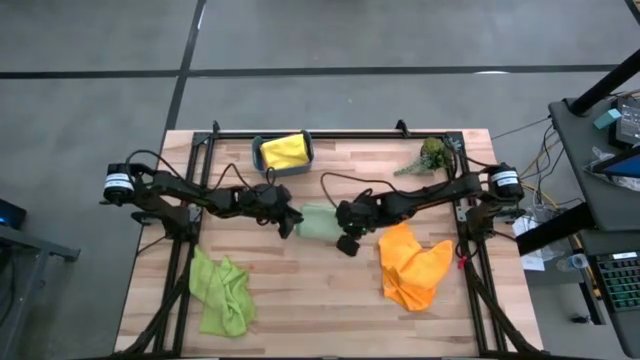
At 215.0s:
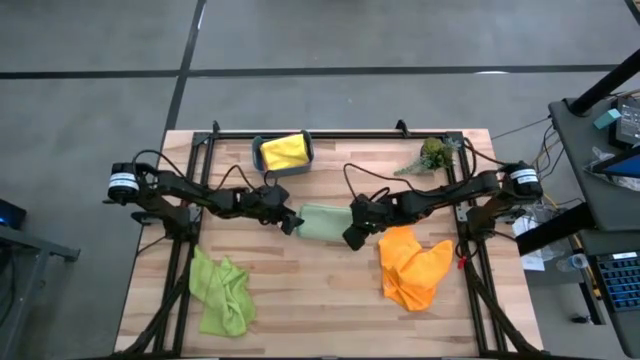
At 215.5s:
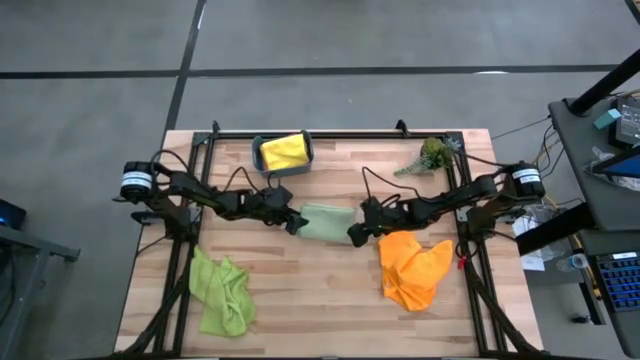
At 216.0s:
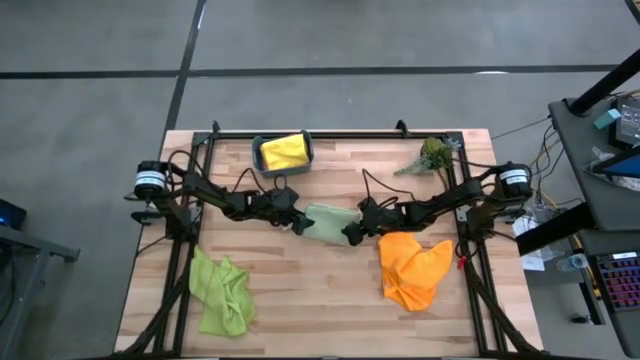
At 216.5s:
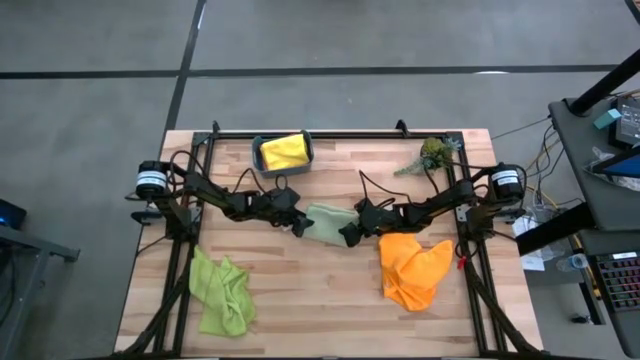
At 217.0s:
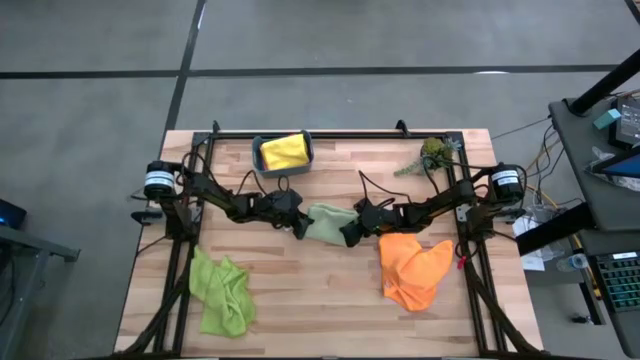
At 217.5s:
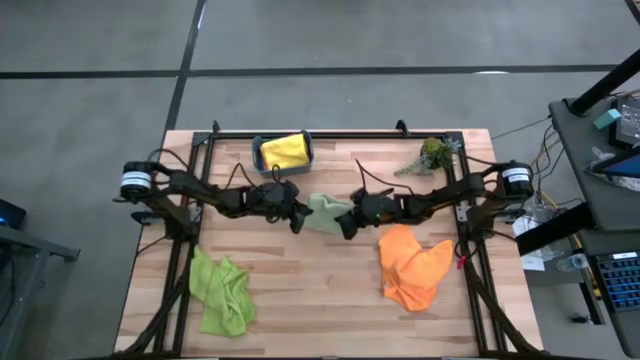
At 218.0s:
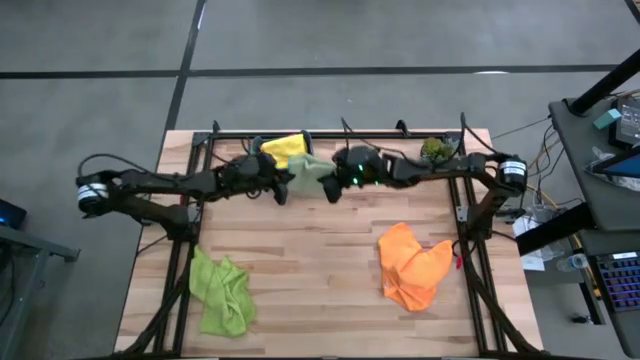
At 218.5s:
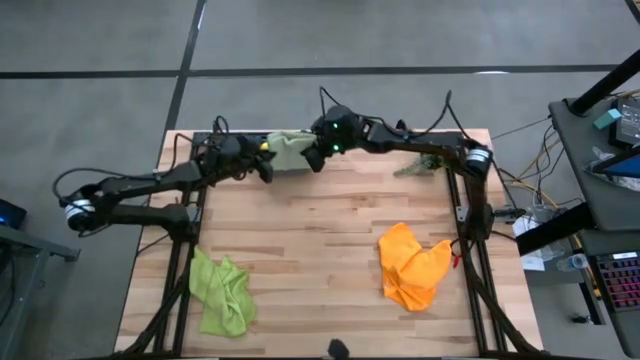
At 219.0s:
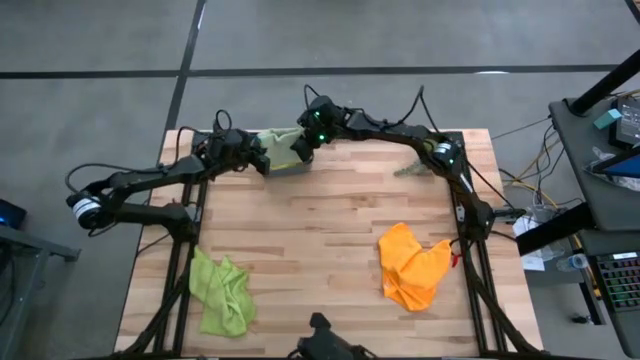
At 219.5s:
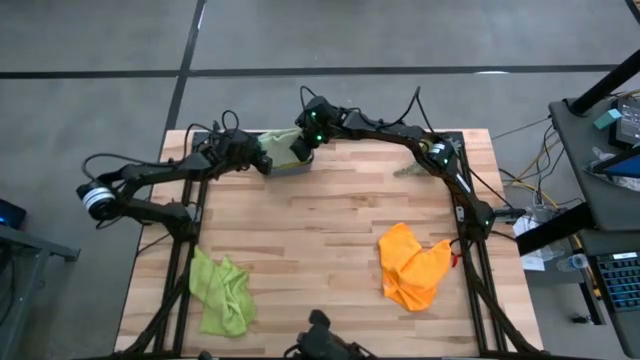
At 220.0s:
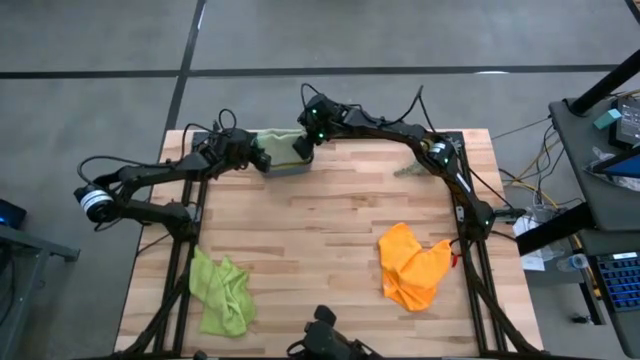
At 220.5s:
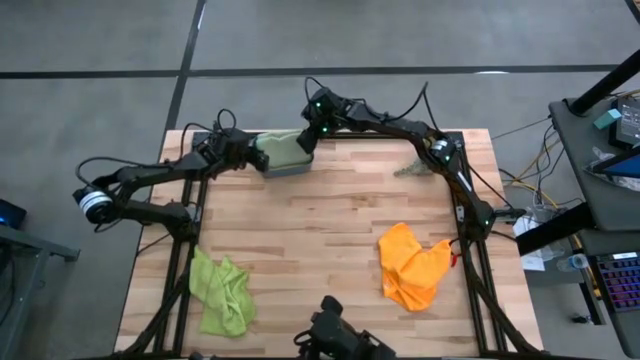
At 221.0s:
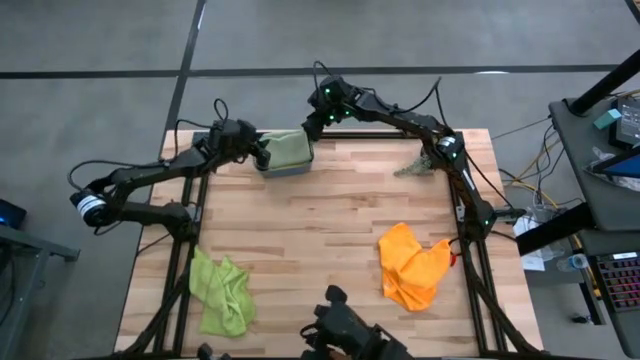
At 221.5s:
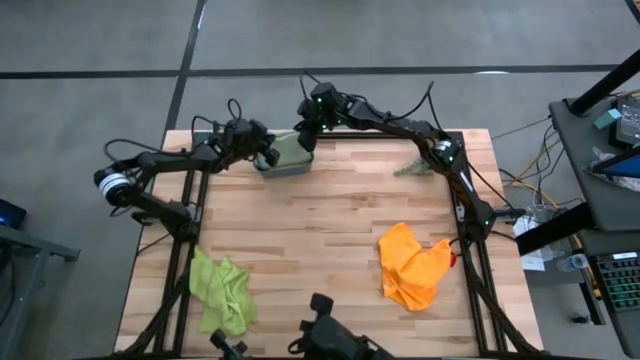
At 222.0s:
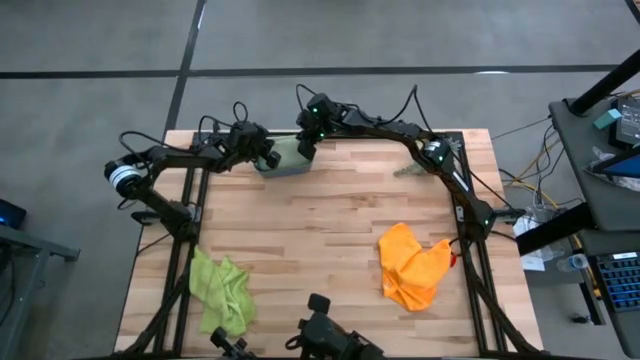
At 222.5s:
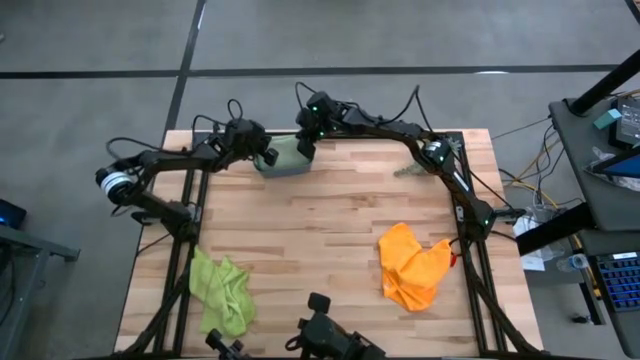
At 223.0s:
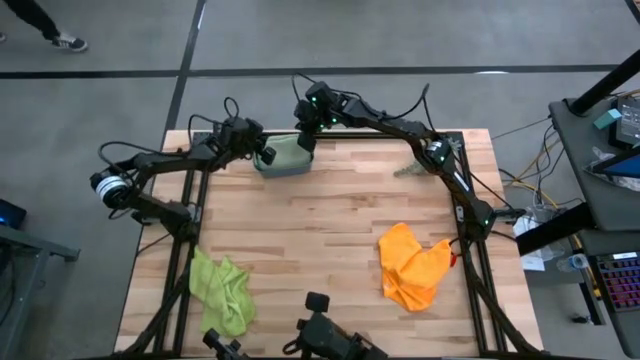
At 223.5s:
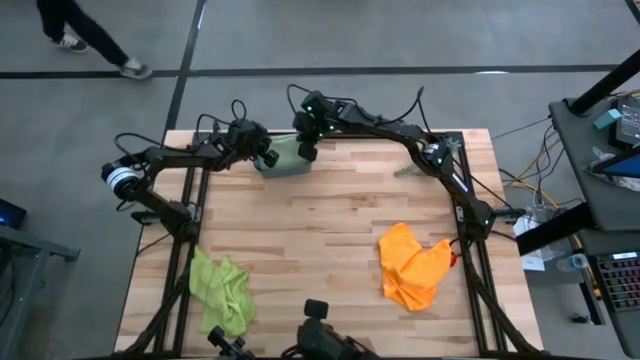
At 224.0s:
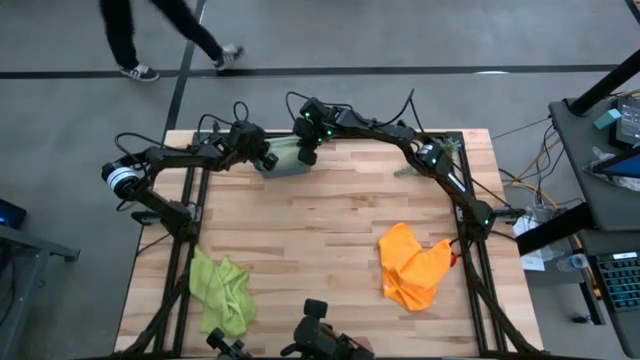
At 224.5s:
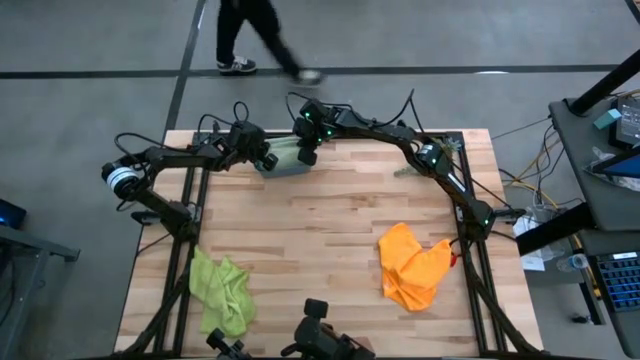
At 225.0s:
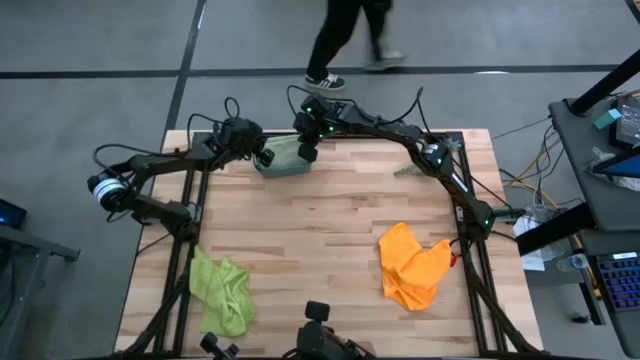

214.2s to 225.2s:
Task: Fold microfiber towels
Put the green microfiber towel into the green bin

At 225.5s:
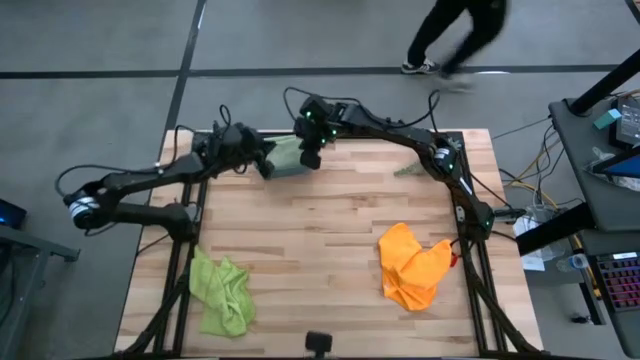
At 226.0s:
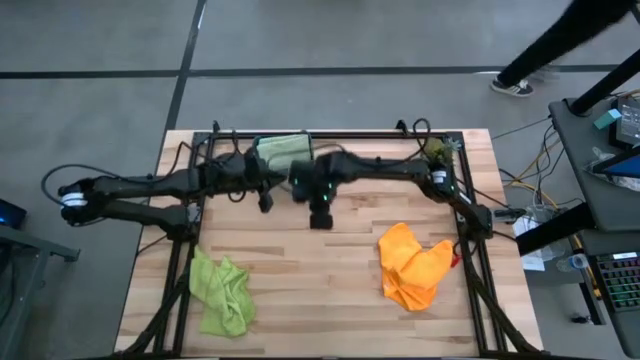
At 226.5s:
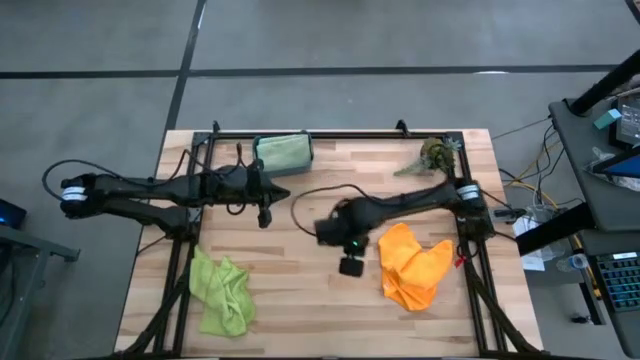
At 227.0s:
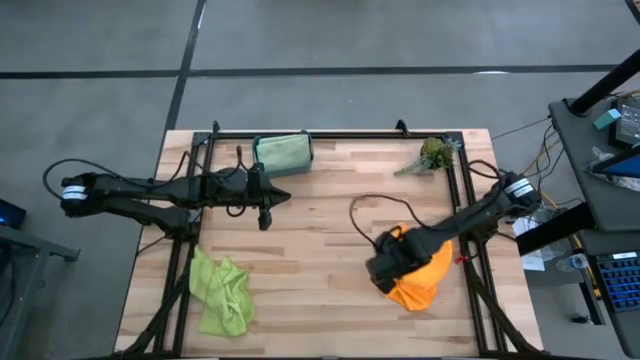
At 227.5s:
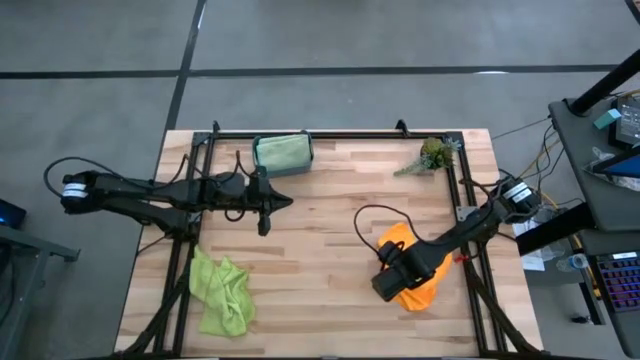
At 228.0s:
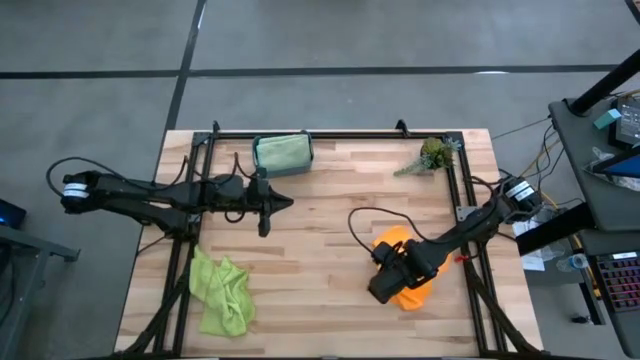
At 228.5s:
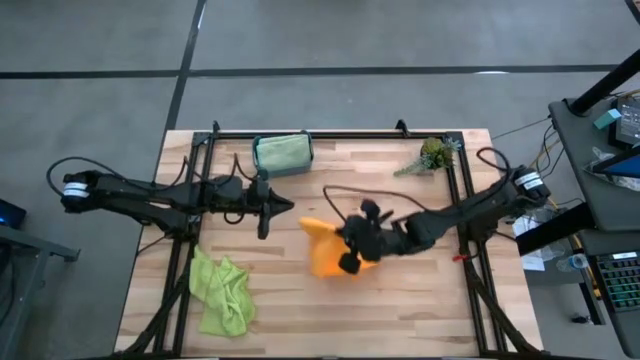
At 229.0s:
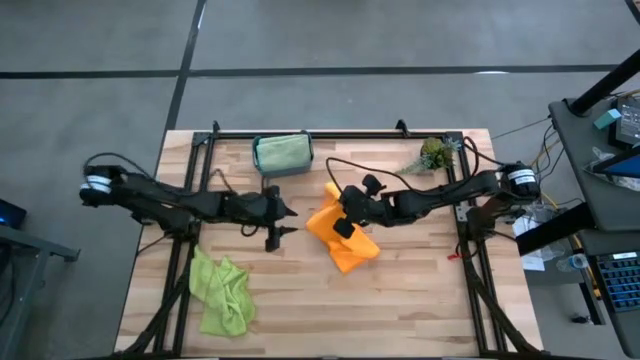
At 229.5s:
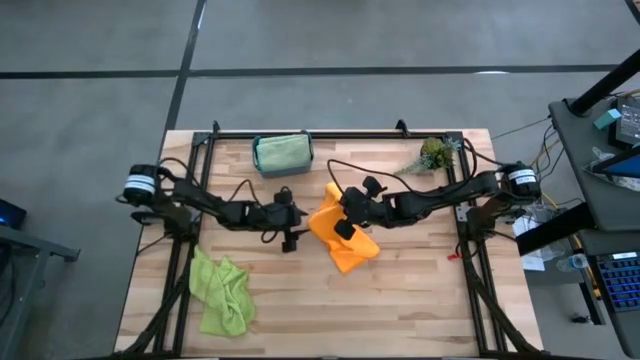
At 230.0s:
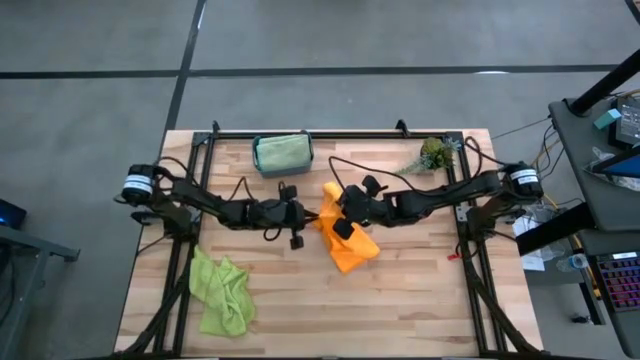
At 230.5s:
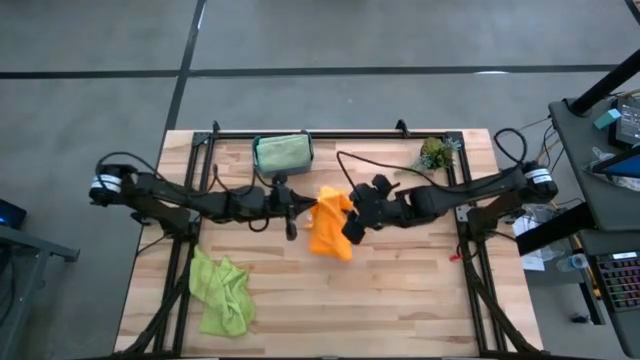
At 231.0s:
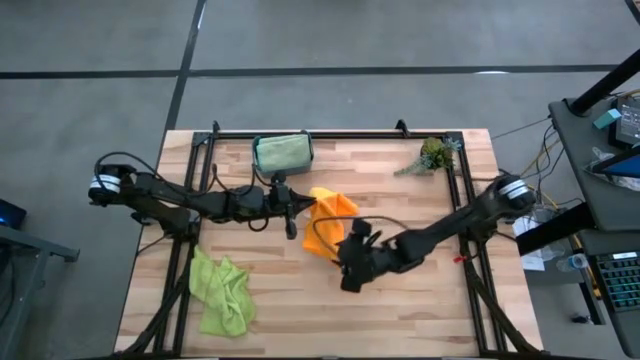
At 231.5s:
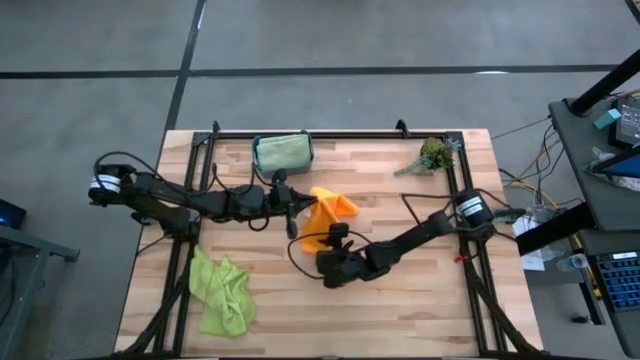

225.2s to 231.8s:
Fold the orange microfiber towel

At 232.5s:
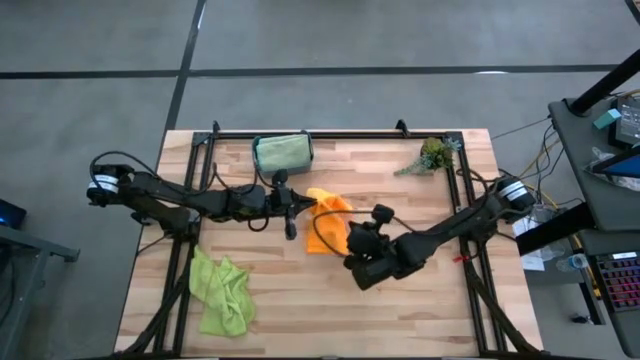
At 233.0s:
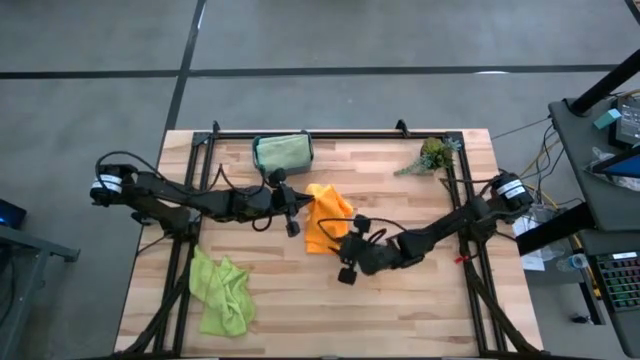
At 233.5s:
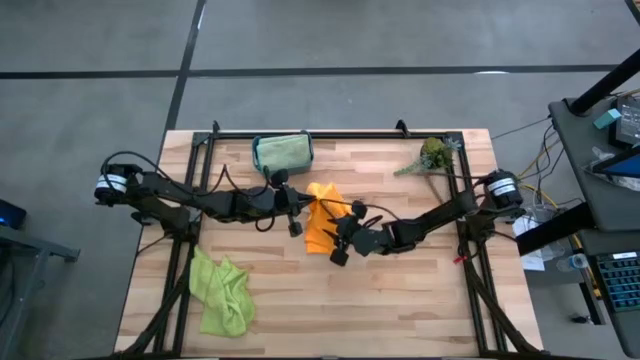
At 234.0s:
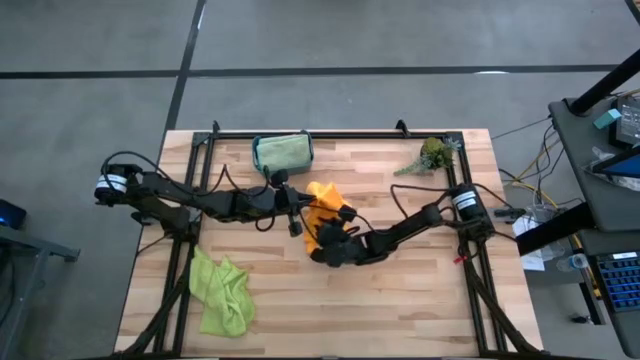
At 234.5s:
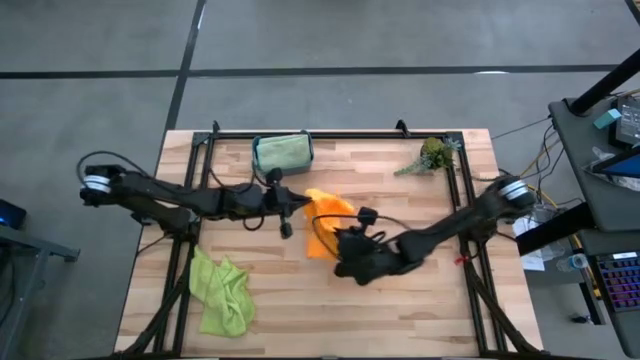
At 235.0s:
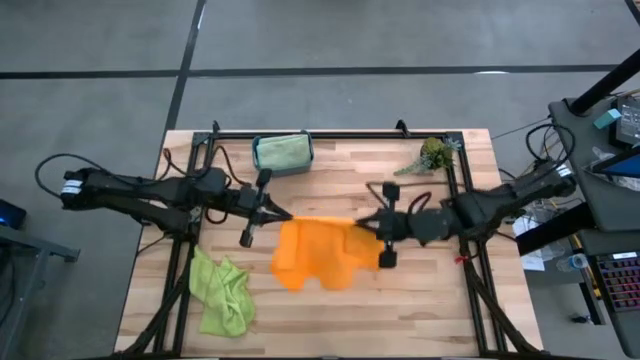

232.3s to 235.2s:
Fold the orange microfiber towel

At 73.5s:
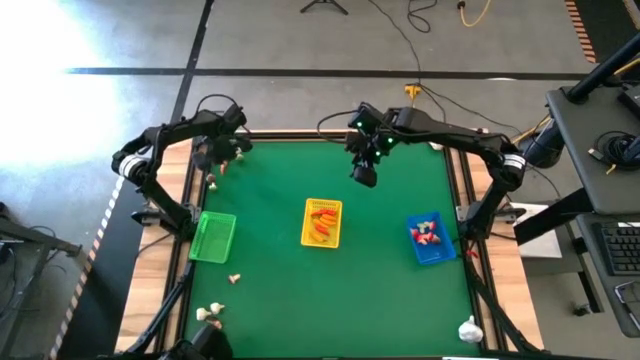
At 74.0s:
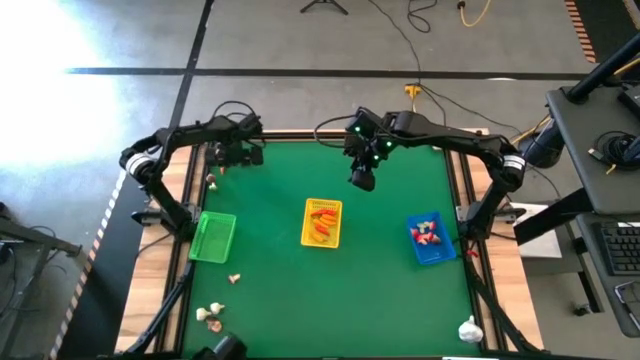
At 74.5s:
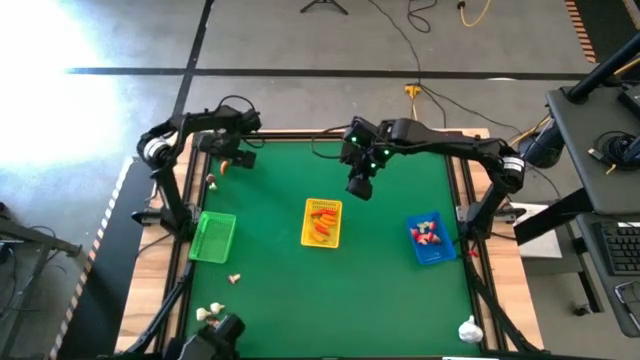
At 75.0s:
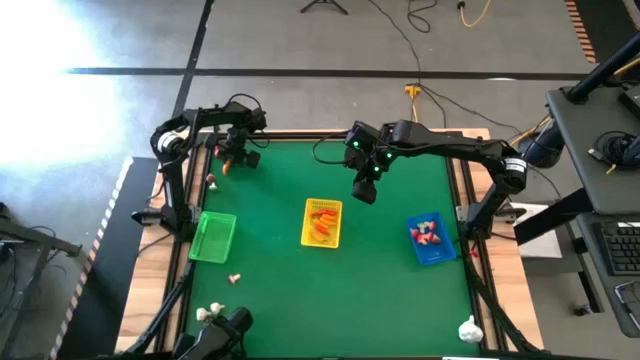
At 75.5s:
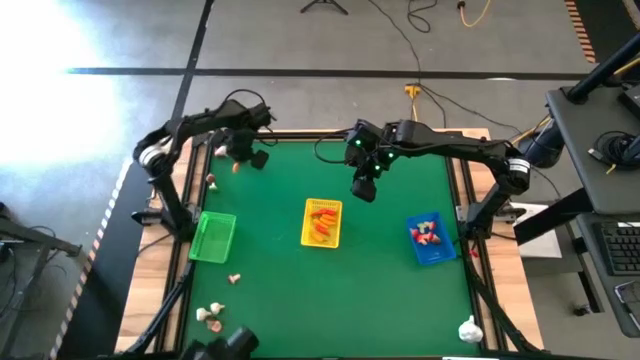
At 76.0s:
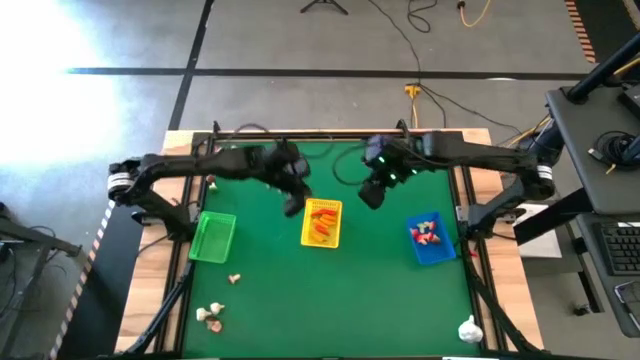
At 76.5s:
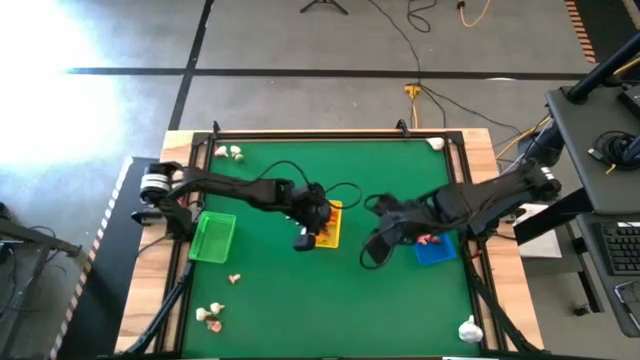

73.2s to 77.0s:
Task: Sort produce into baskets
Put the yellow chili pepper into the yellow bin
